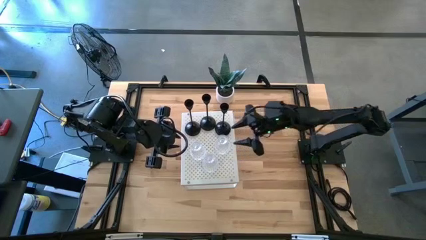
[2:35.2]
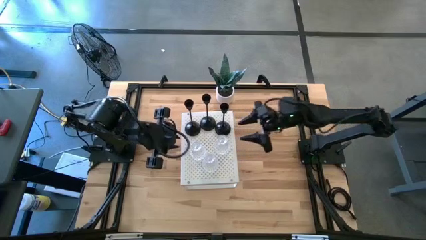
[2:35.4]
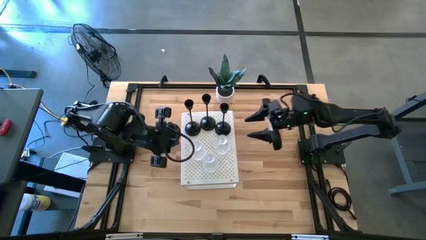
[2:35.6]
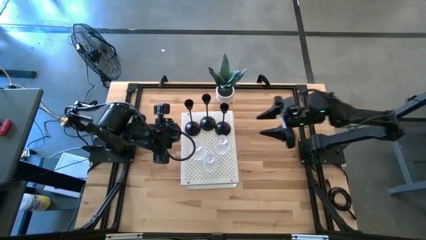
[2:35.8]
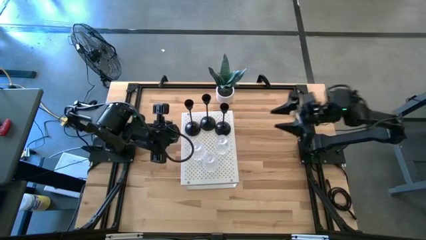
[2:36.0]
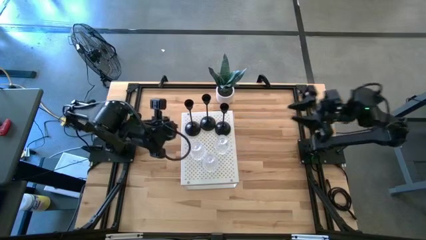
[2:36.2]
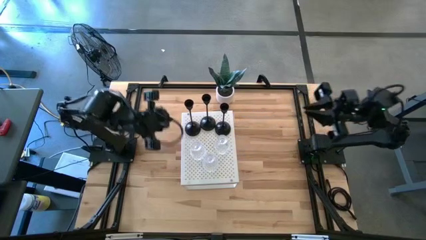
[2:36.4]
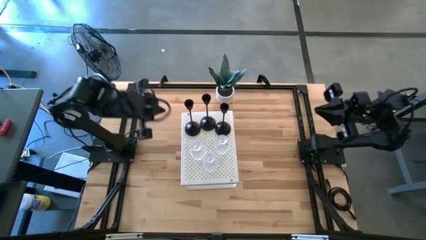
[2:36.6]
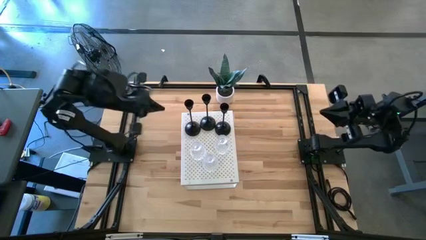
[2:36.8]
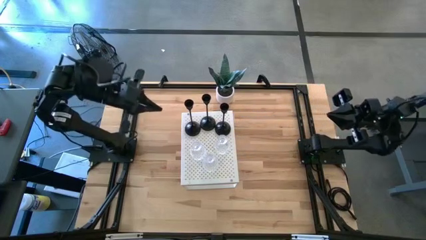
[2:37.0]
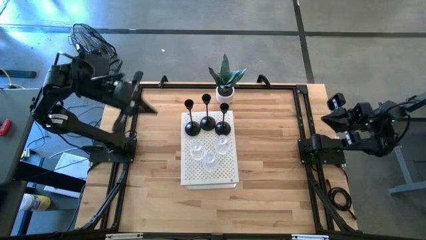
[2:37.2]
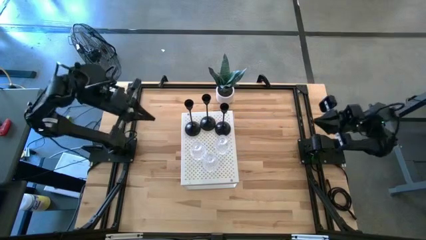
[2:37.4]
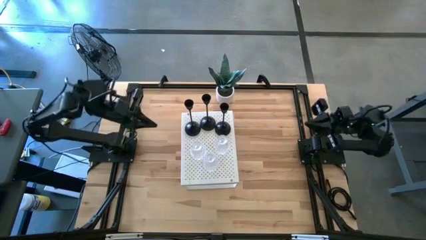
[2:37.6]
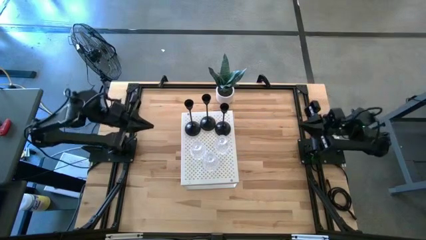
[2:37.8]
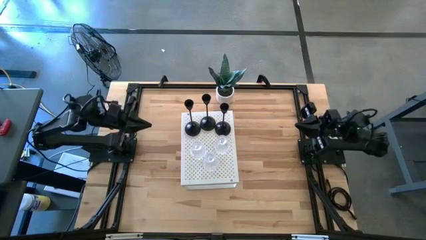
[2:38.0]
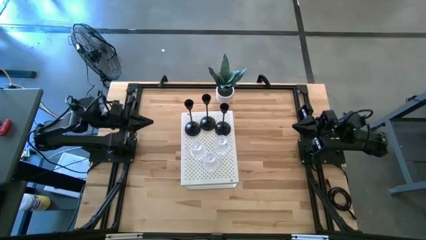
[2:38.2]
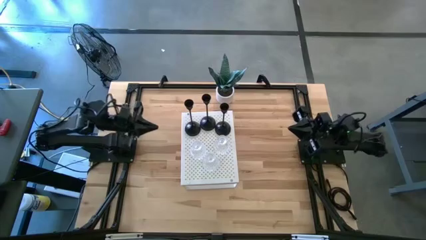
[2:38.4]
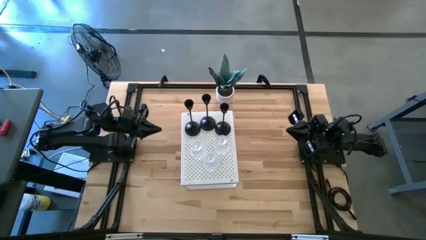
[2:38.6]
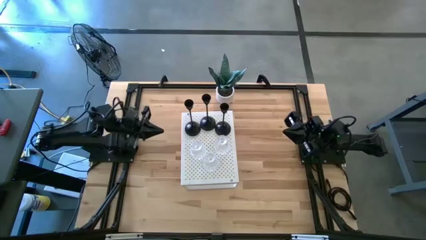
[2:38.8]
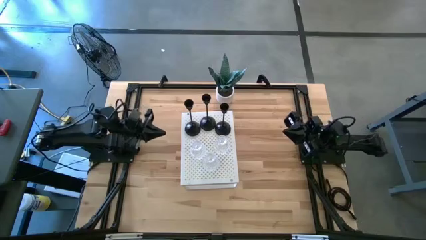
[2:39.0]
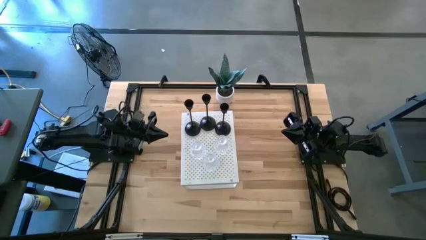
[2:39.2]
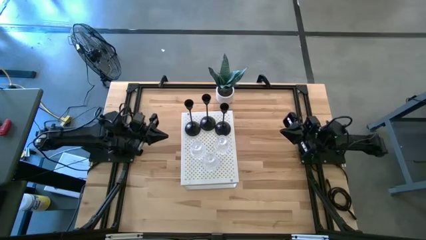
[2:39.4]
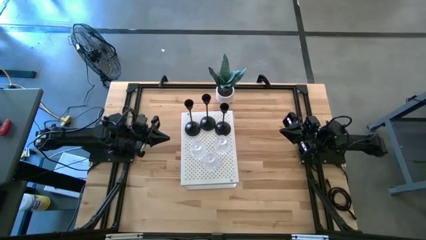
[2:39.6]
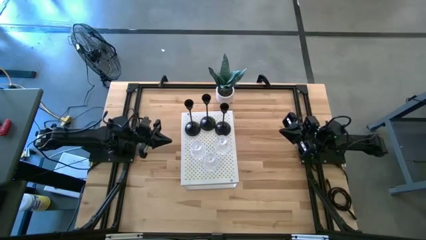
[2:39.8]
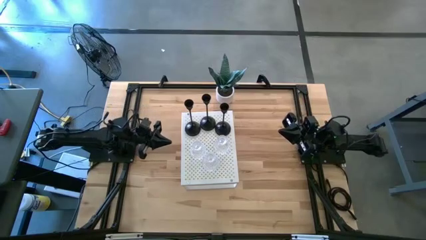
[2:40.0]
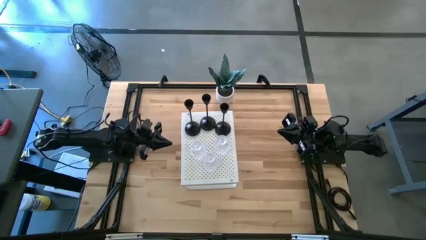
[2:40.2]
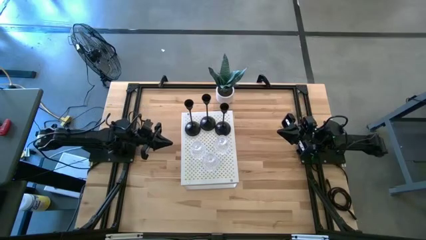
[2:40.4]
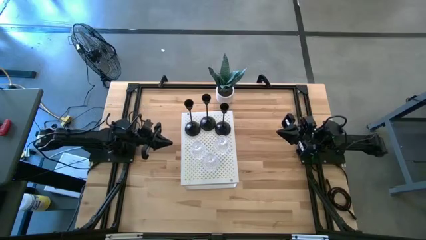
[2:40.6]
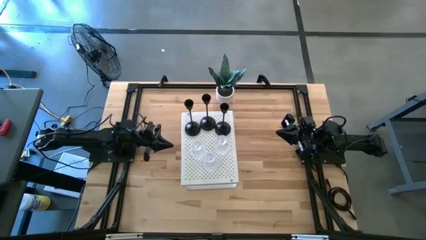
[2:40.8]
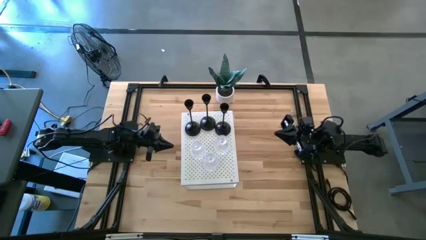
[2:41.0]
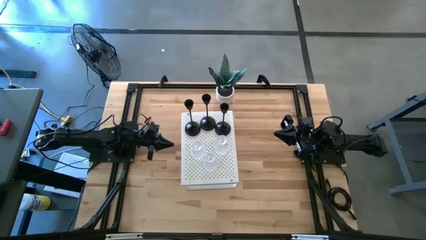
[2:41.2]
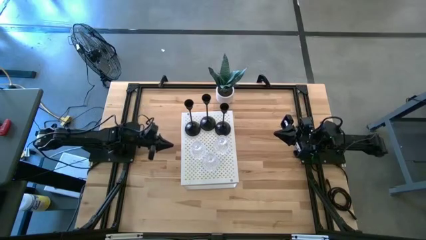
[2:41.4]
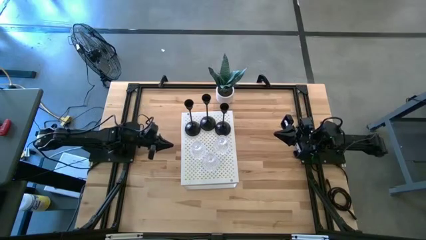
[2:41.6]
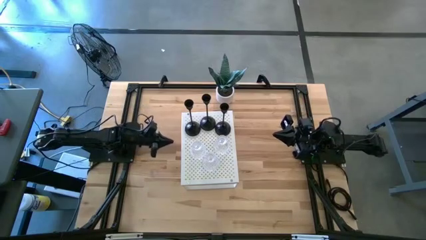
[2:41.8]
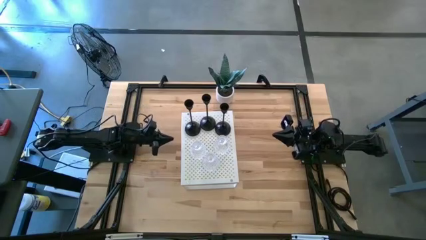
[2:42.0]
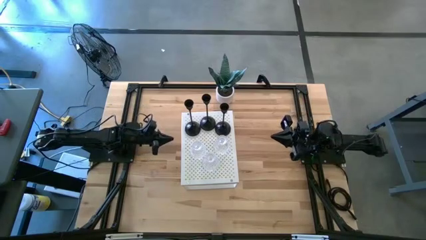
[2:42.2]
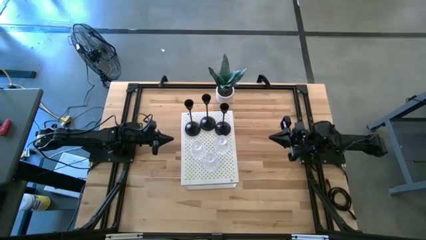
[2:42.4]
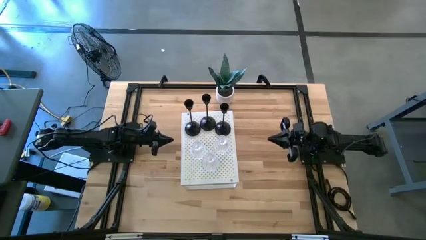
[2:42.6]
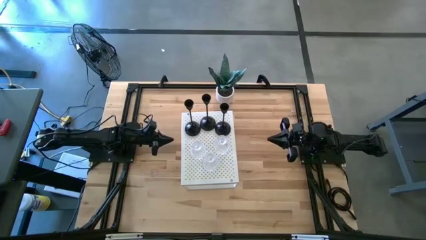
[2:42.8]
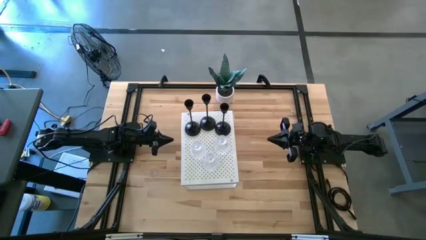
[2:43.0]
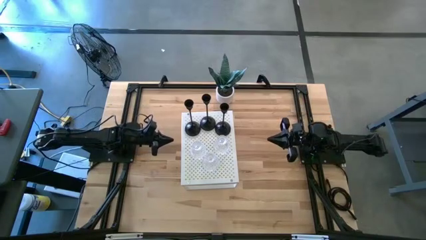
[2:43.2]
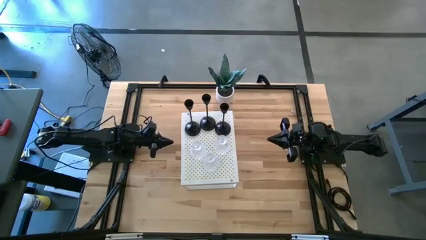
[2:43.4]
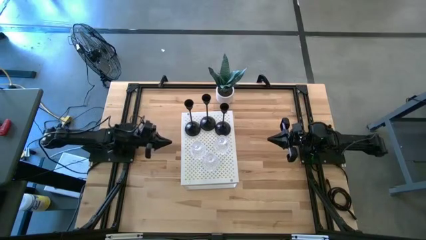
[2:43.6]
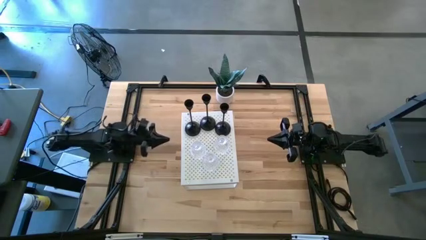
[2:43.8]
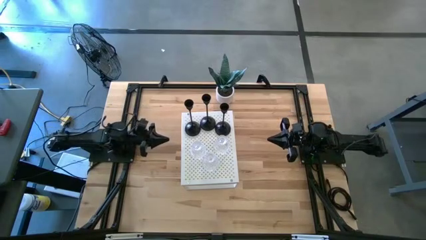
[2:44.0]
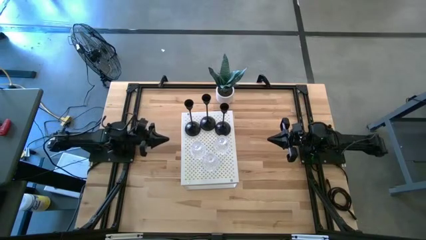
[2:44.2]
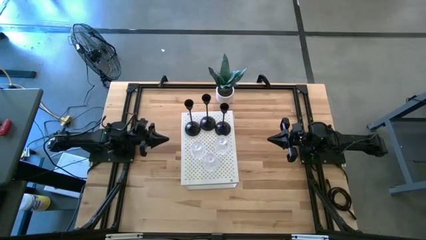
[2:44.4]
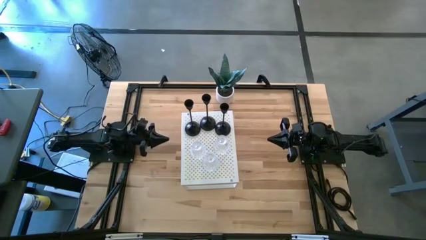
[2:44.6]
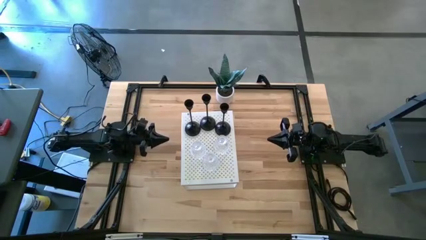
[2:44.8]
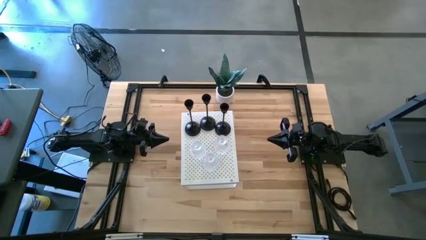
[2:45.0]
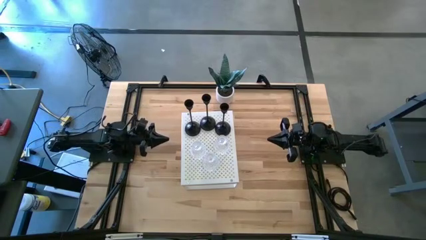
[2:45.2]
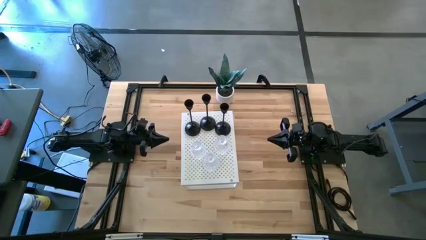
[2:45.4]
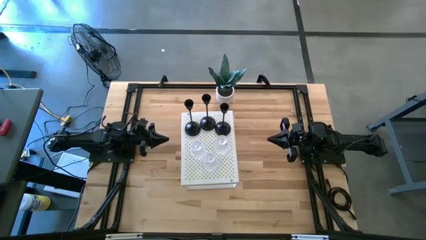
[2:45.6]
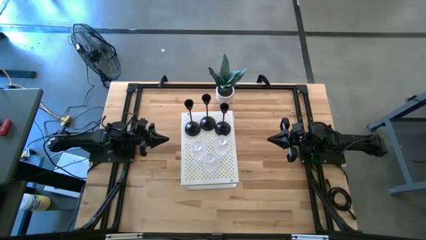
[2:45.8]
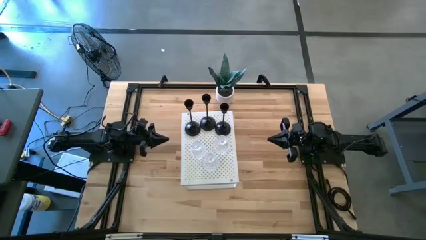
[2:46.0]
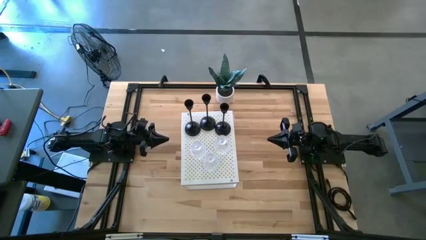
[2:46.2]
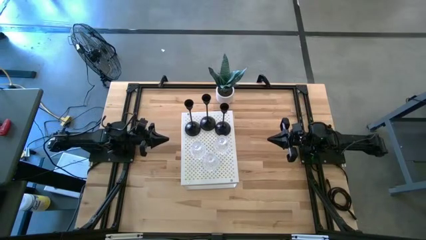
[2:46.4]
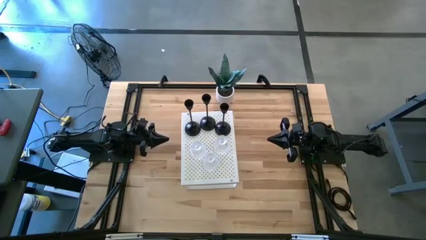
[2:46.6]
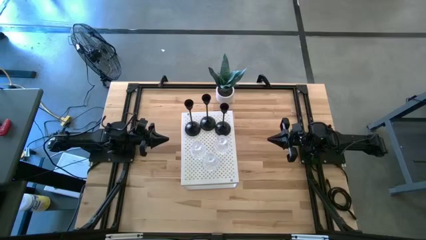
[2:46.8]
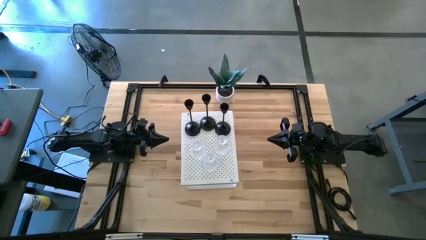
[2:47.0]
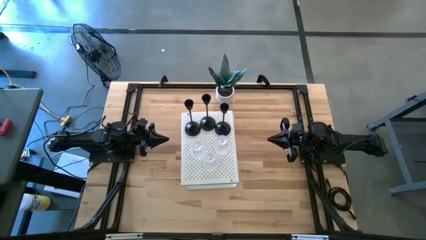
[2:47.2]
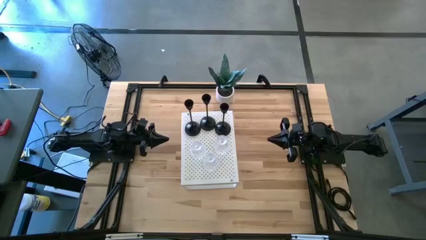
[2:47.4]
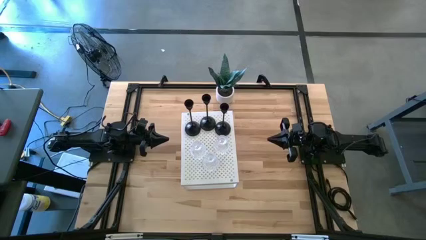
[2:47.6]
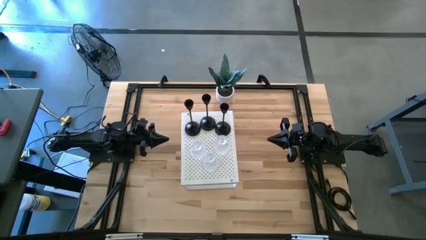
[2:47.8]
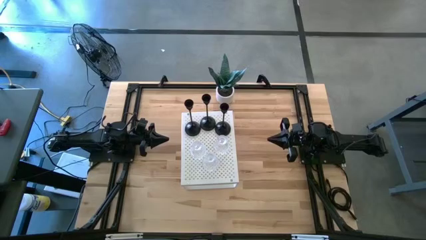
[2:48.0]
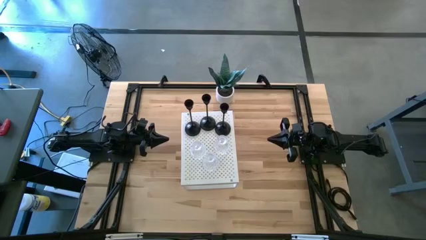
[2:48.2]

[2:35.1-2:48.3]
Task: Pick & Place candle stick holders
Return to Home Position

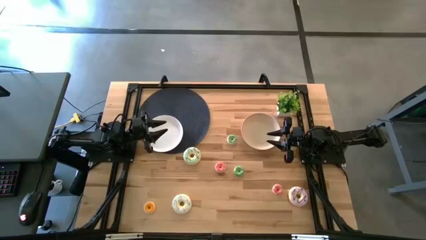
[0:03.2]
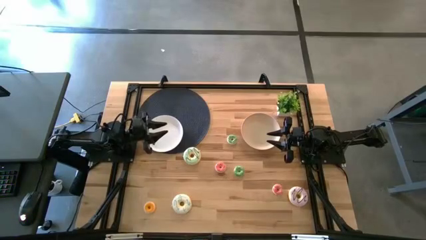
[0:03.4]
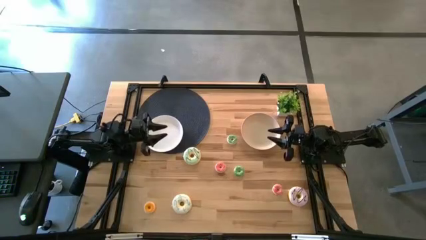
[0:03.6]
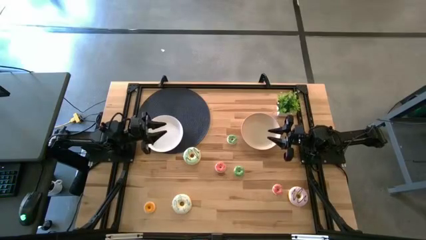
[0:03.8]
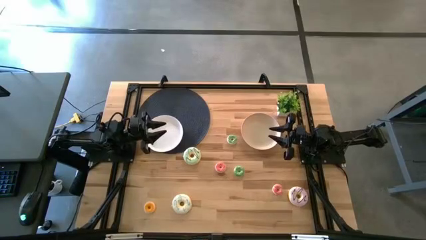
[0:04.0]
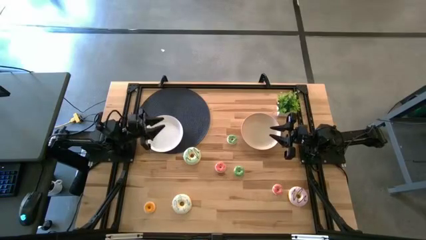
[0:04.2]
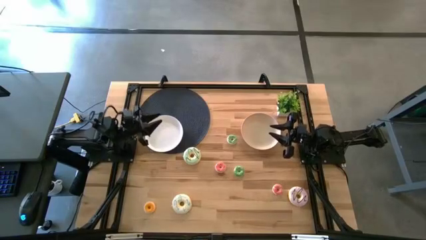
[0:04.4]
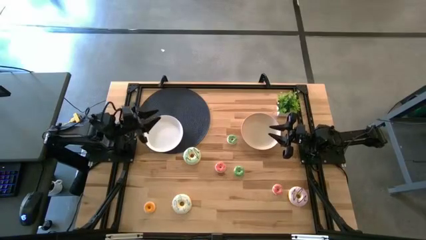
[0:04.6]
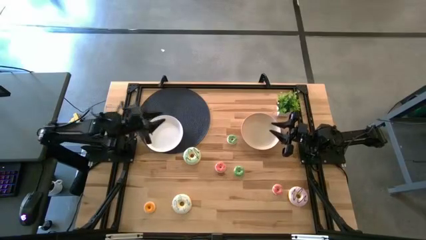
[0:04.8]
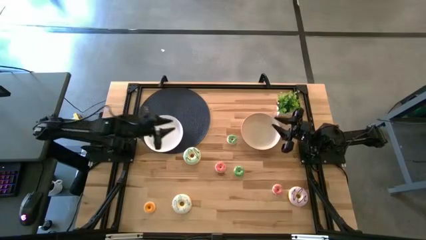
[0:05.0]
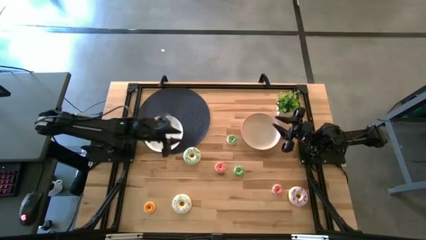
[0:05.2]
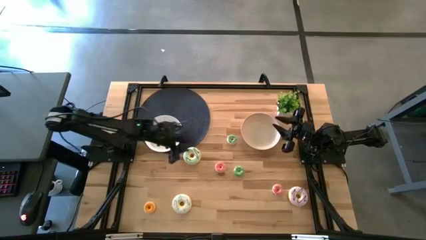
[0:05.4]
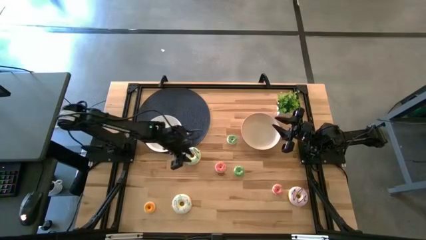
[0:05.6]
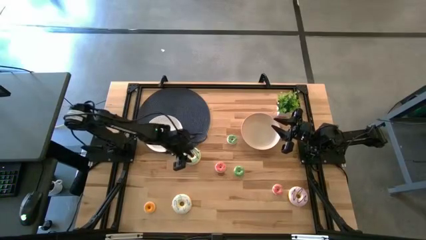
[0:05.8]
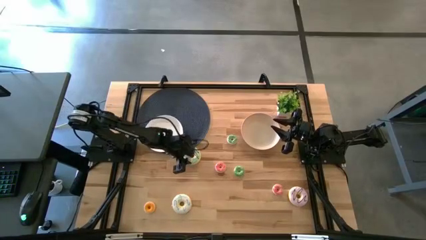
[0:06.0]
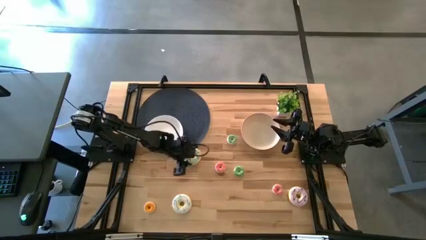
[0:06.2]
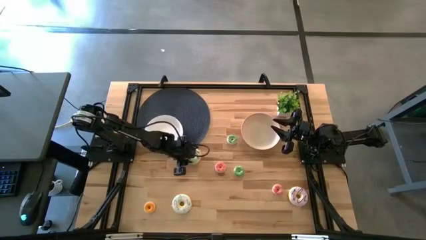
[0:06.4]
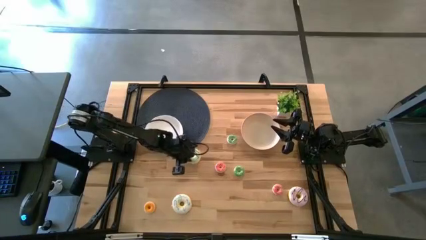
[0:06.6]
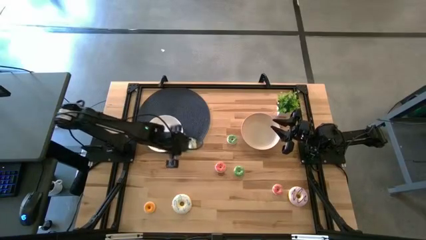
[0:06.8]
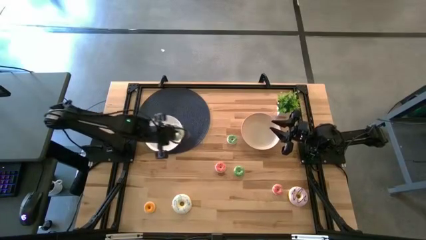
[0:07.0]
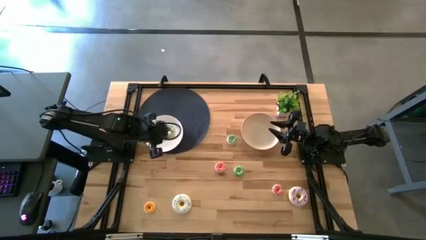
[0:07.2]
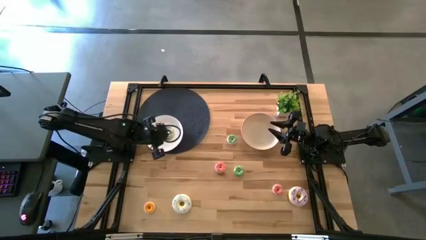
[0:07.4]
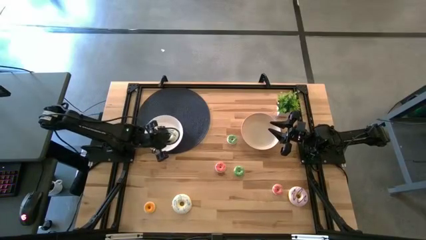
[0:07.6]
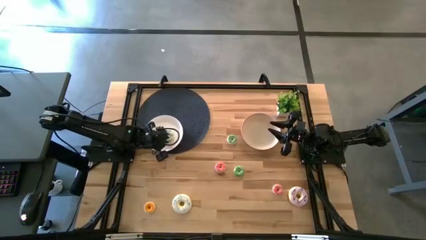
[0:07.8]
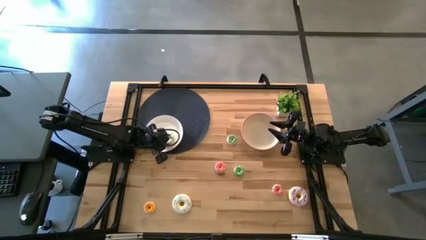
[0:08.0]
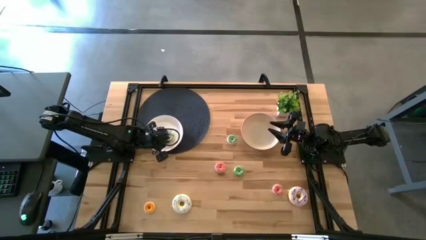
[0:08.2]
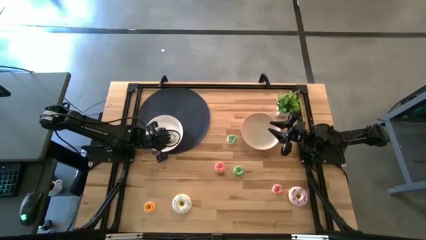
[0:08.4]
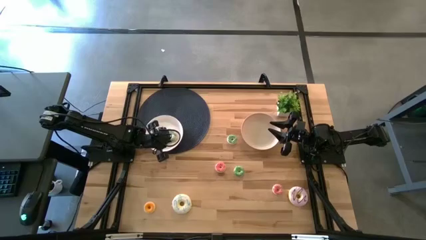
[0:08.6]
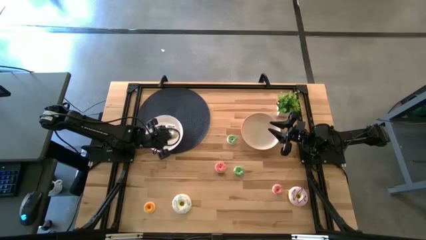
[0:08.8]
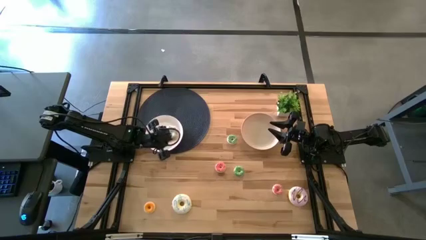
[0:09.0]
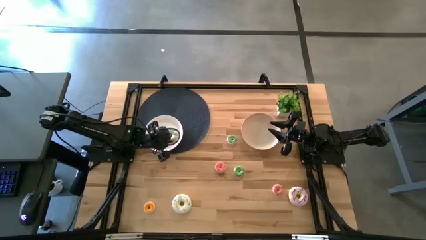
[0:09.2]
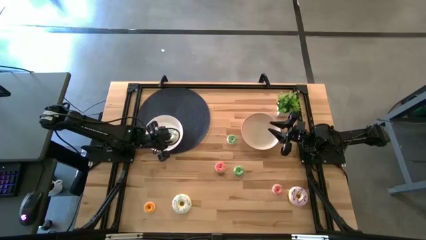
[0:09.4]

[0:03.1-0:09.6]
Task: Pick & Place donuts
Put the large light blue donut on the left white plate
